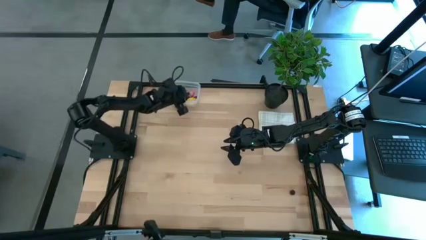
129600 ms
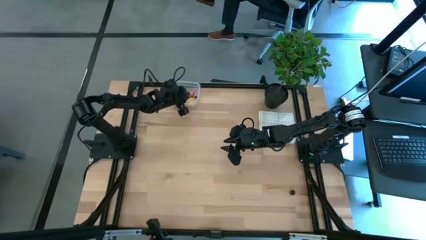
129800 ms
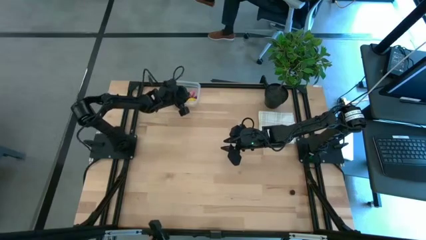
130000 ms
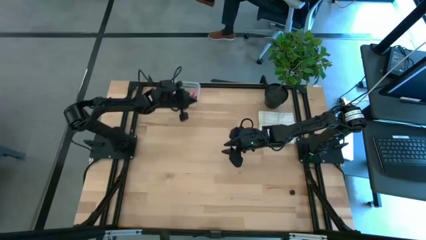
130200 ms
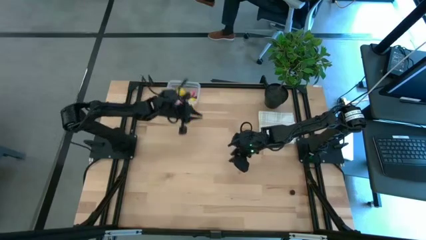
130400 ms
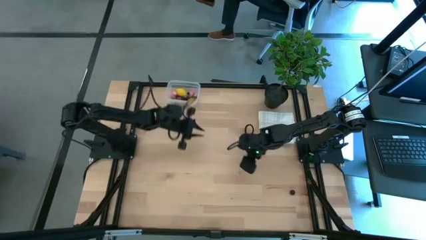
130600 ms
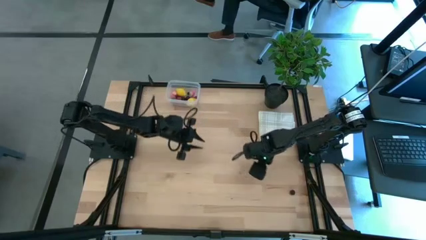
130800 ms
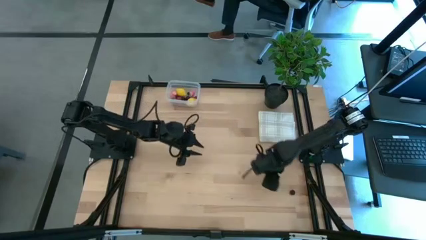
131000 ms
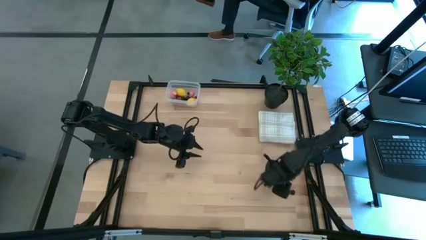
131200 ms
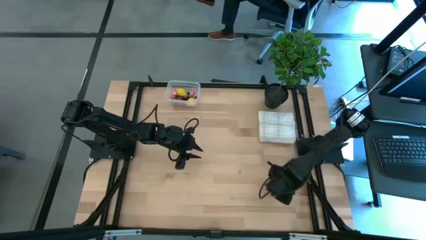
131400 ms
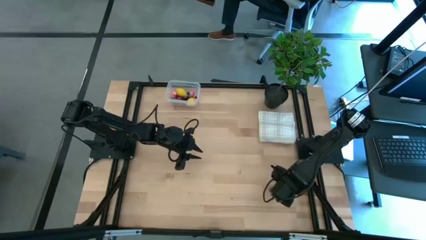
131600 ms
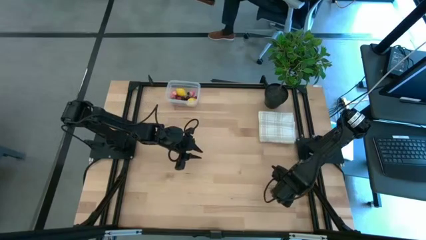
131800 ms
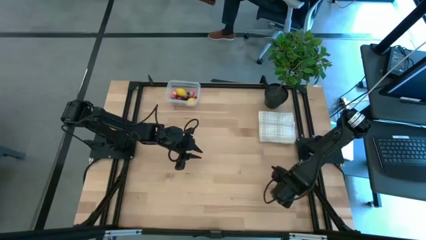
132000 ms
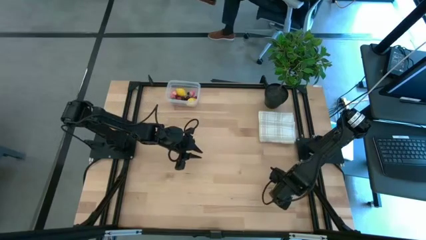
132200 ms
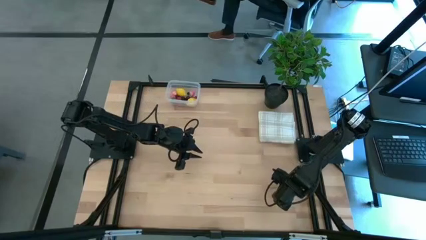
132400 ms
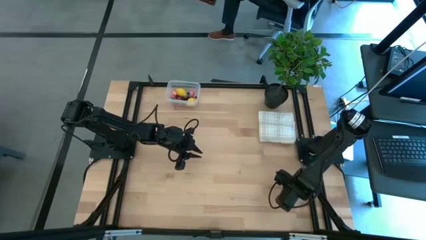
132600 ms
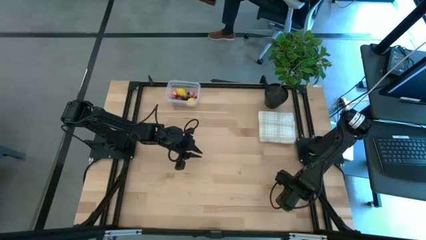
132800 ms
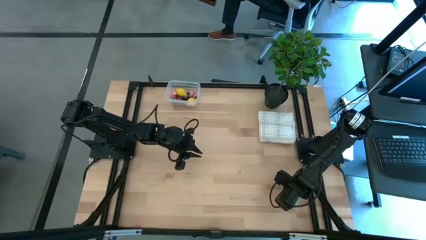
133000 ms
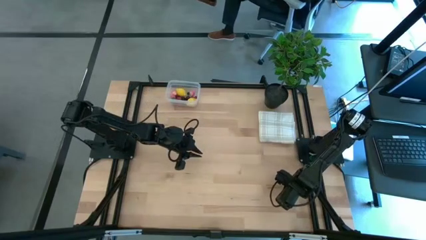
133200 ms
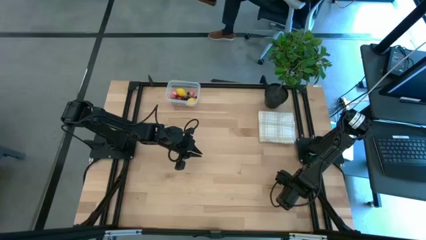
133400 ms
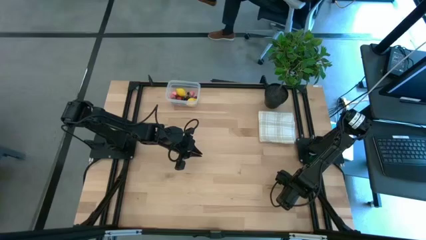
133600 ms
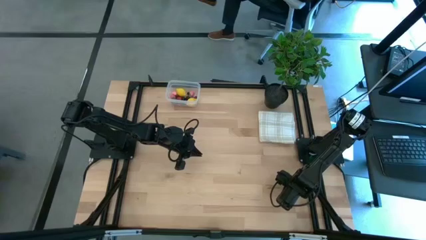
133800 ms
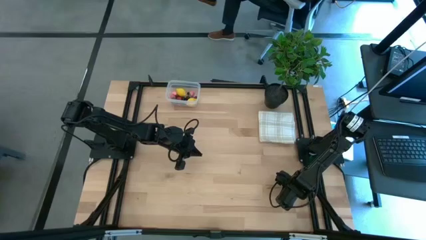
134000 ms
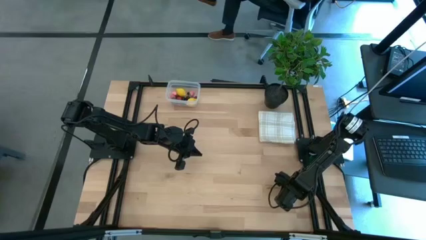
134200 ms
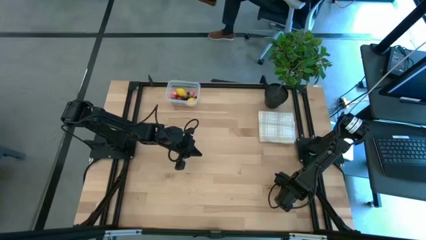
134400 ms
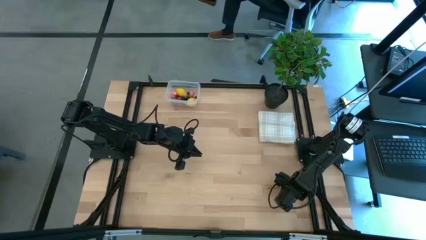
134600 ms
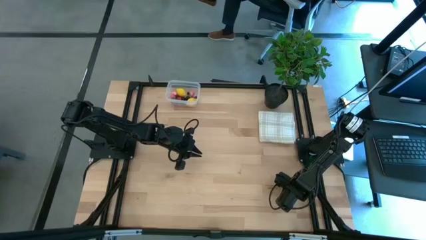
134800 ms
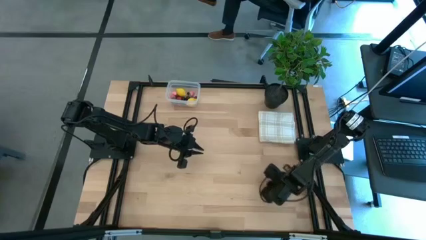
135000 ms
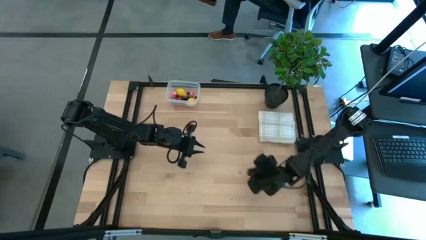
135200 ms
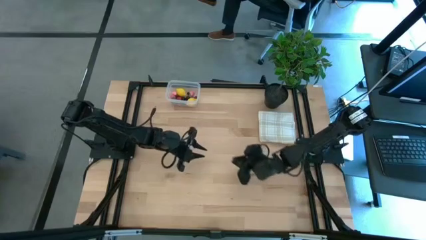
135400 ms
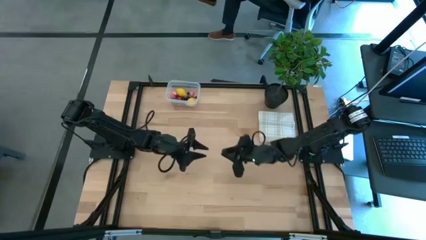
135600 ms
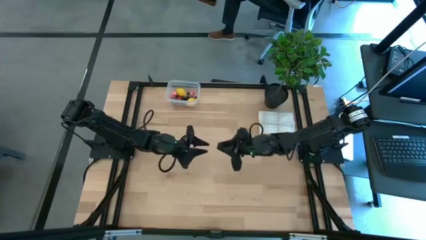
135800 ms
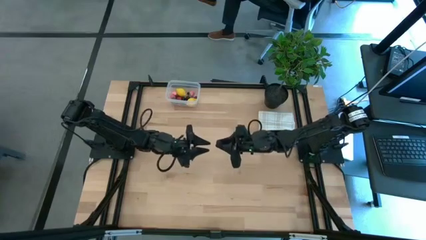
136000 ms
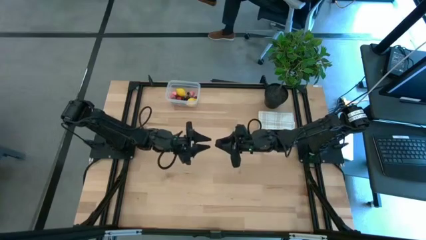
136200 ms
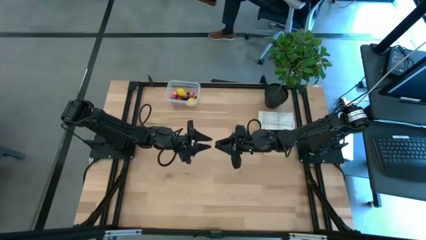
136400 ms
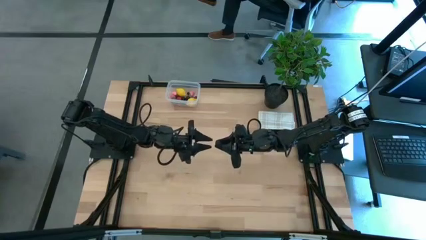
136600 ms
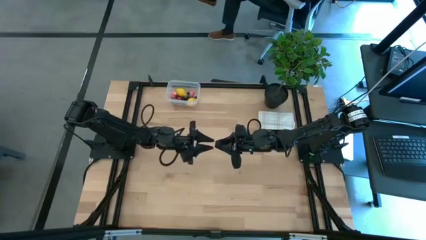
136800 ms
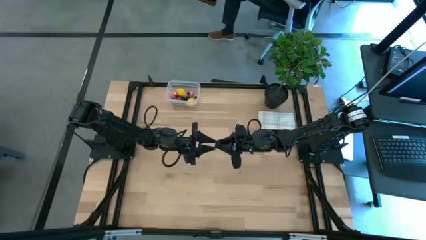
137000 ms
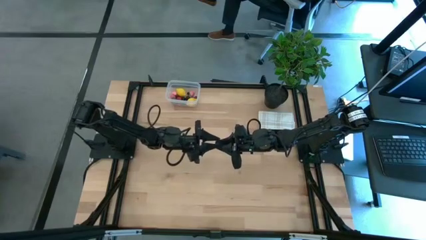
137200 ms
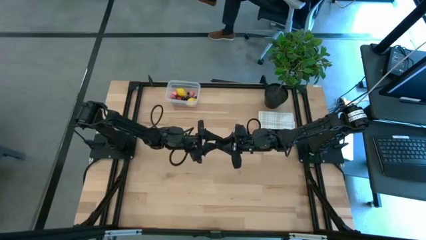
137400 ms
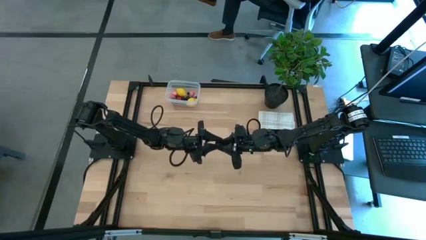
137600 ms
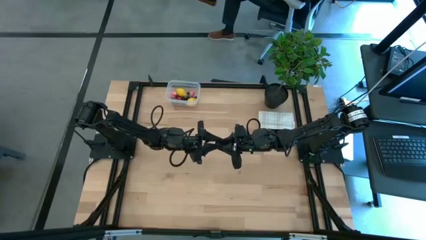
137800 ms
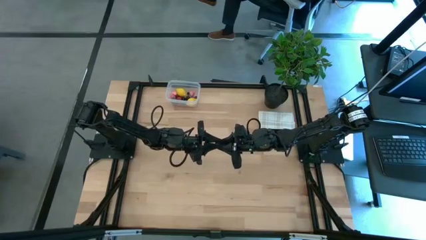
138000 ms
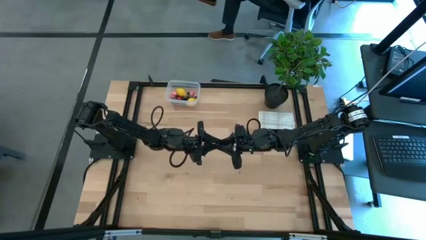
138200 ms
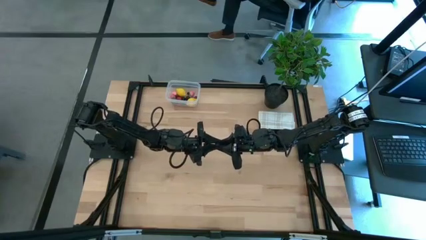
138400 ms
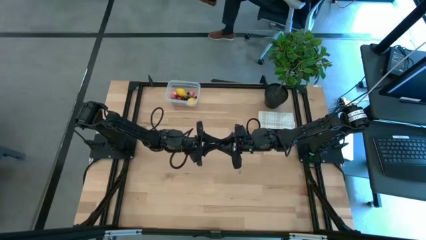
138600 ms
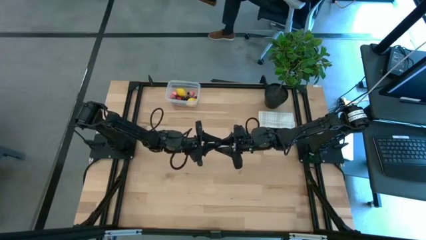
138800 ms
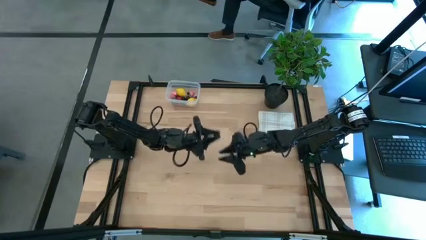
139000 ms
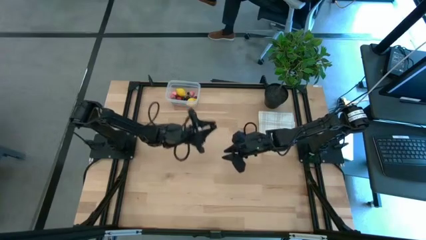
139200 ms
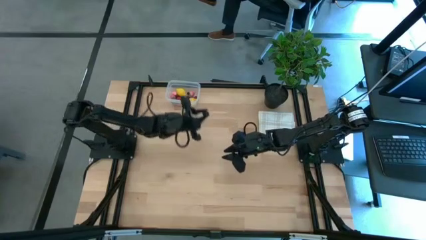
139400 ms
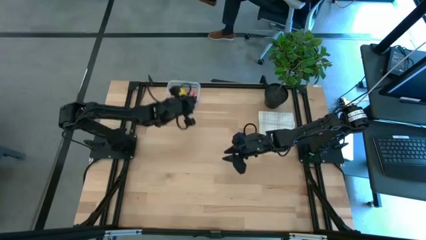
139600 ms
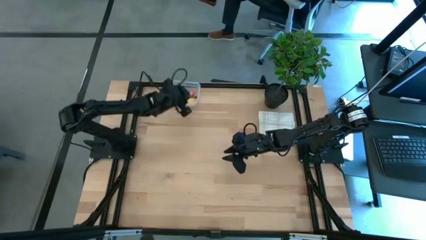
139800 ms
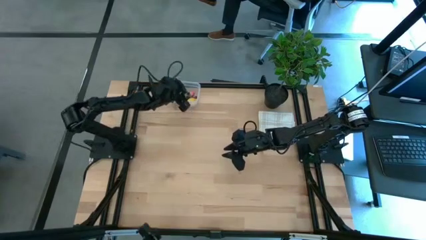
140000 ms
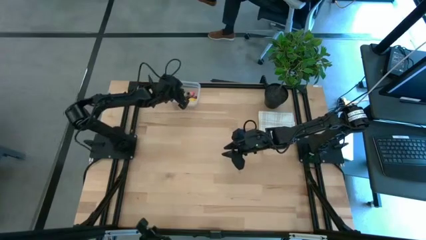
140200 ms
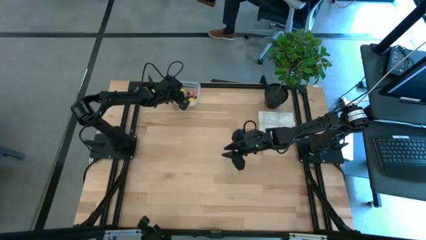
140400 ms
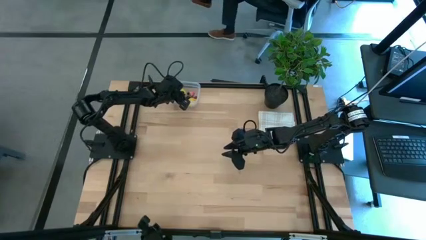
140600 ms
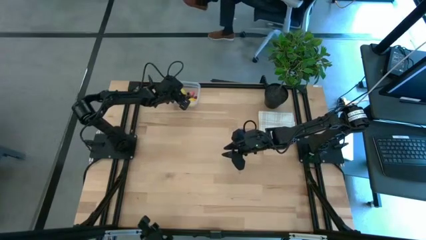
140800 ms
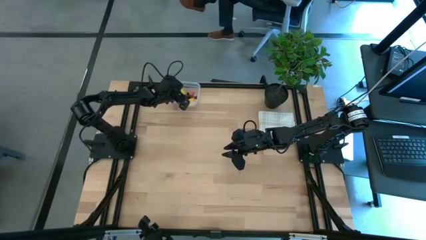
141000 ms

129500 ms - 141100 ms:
Task: Pick and placing Produce into tupperware
Put the blackberry into the transparent bin

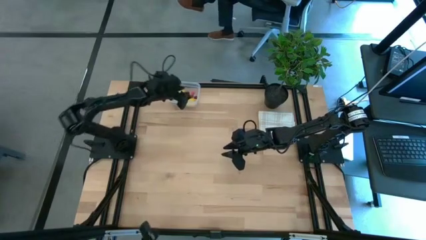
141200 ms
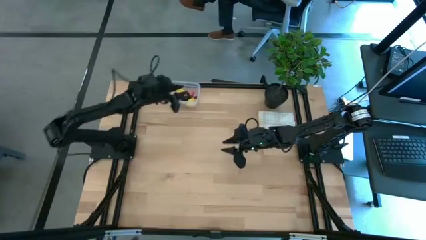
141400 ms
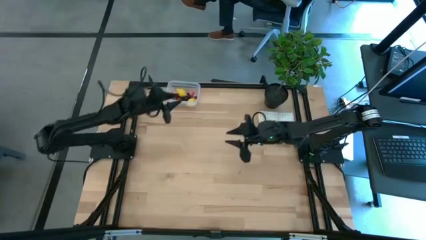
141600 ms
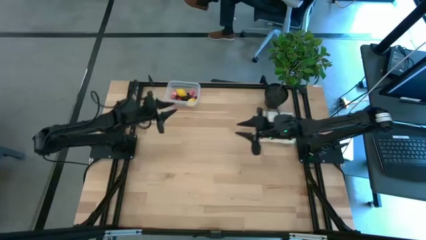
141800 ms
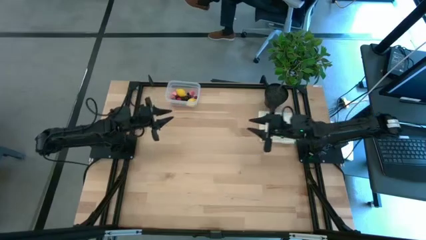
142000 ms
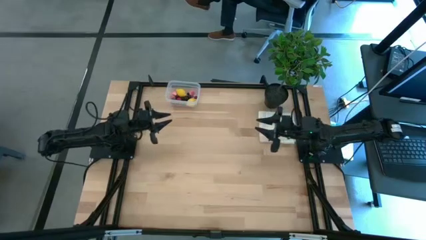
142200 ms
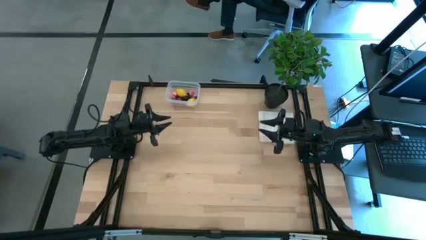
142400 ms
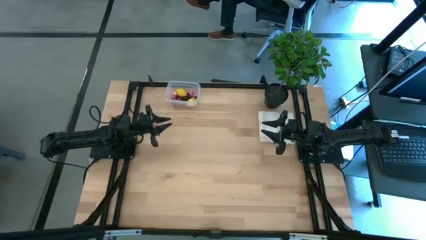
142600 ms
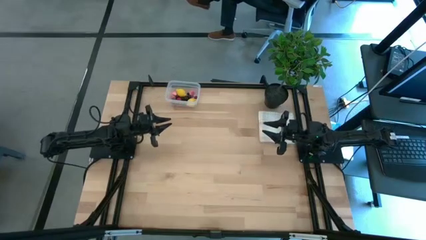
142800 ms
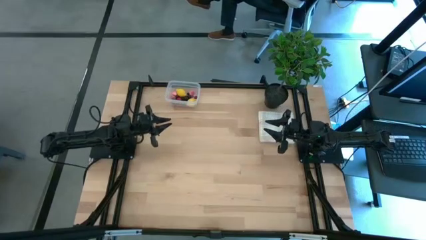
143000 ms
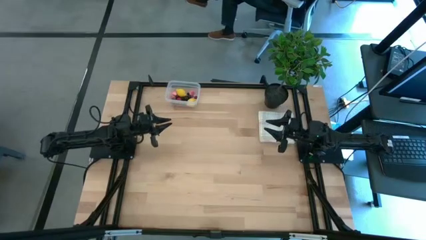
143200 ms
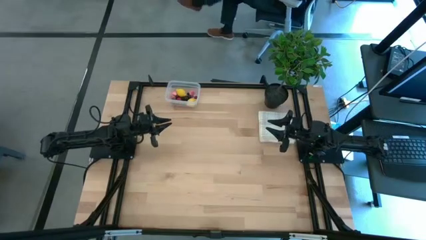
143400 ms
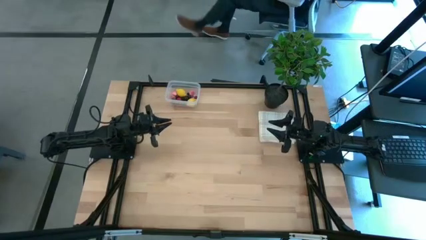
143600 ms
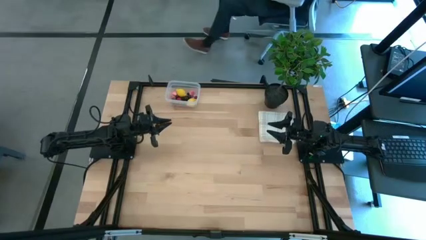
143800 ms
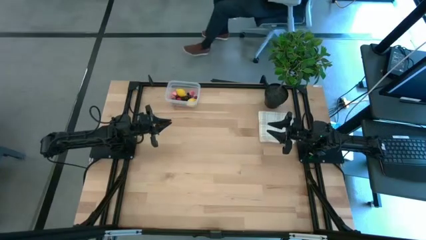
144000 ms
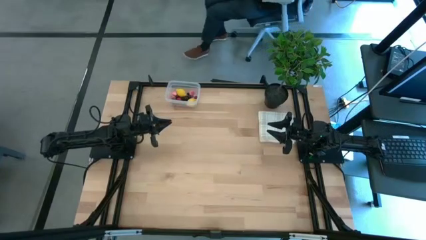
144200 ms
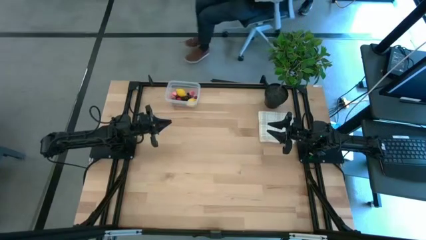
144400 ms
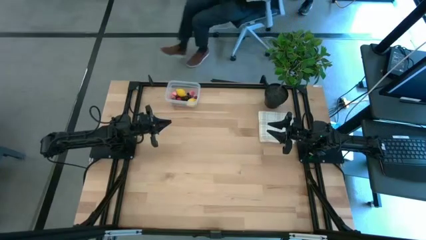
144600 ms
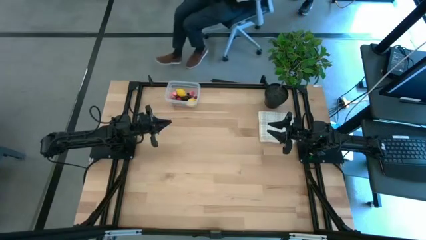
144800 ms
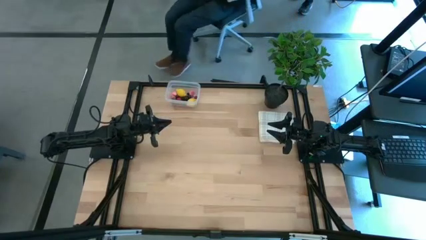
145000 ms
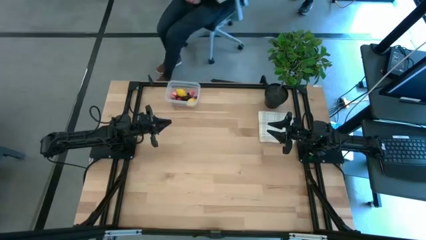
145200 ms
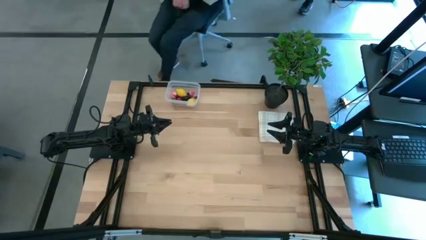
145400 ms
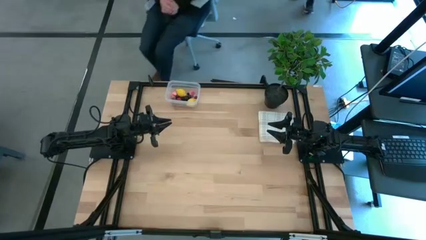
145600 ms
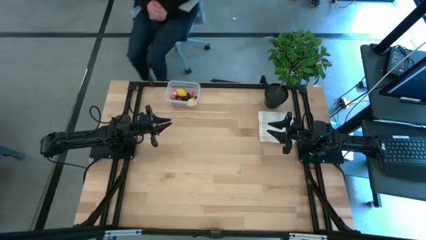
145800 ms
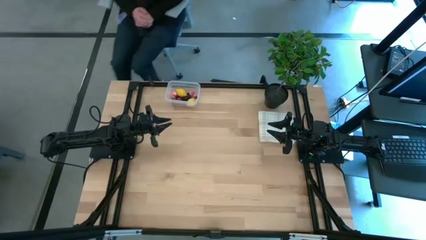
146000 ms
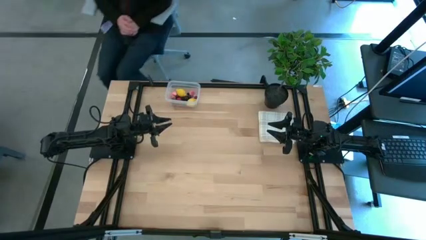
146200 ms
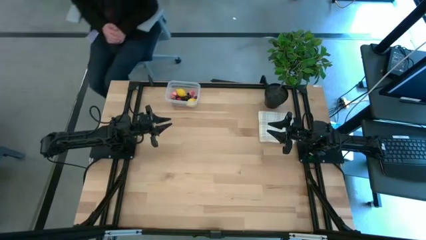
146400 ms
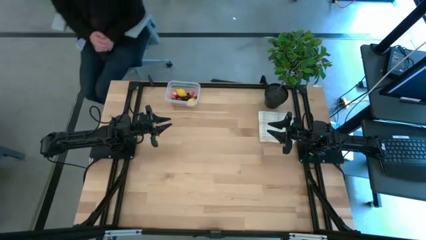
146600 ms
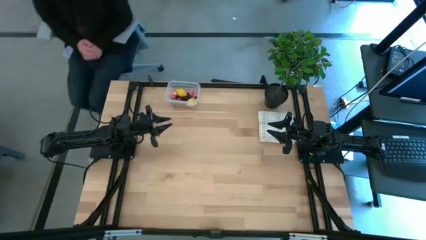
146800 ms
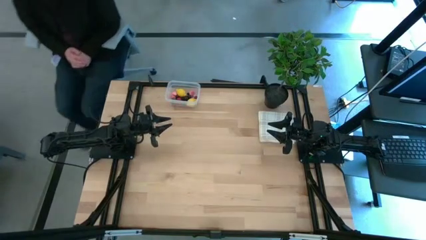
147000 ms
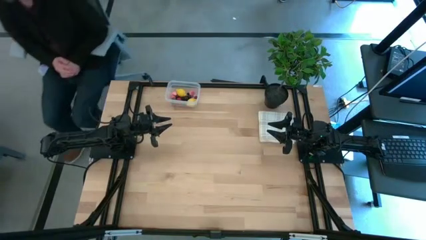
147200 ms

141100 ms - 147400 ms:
Return to Home Position
